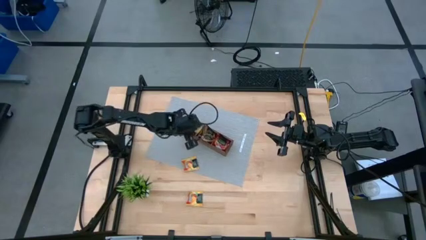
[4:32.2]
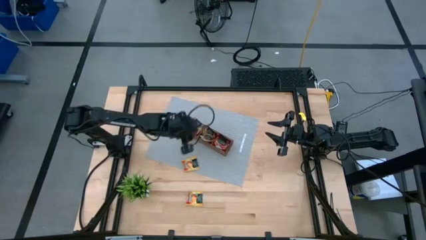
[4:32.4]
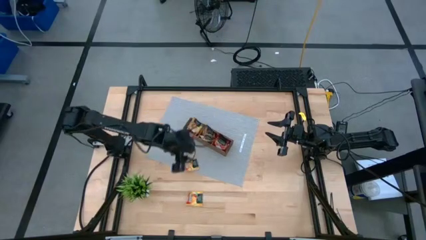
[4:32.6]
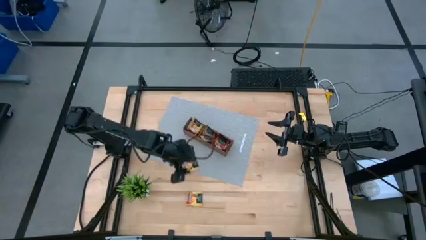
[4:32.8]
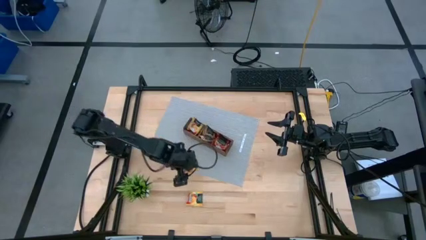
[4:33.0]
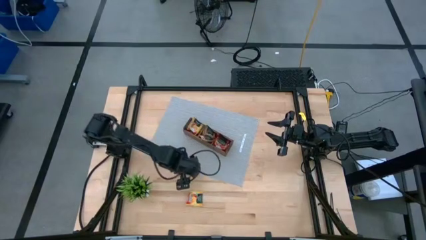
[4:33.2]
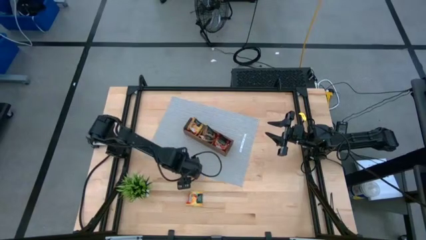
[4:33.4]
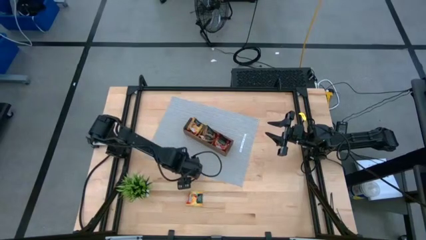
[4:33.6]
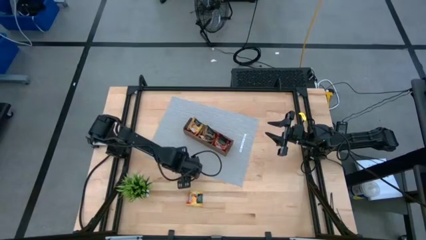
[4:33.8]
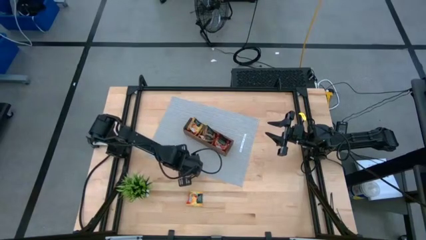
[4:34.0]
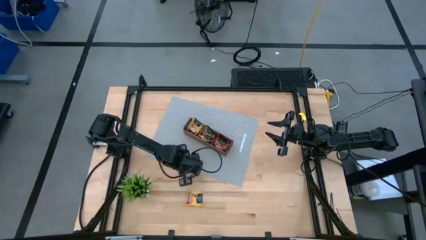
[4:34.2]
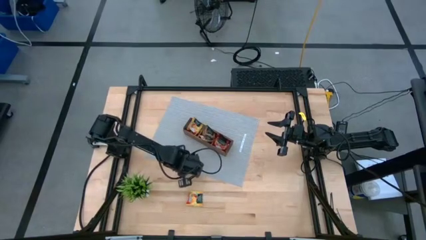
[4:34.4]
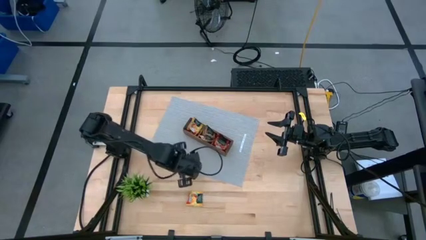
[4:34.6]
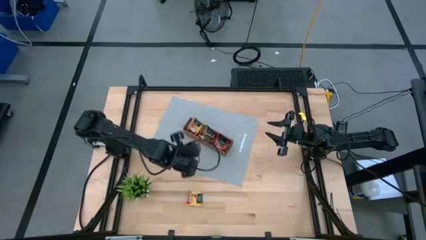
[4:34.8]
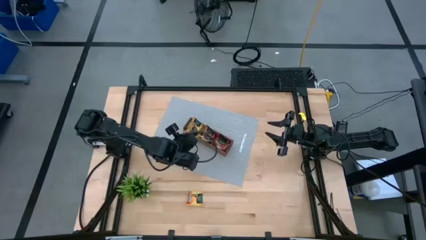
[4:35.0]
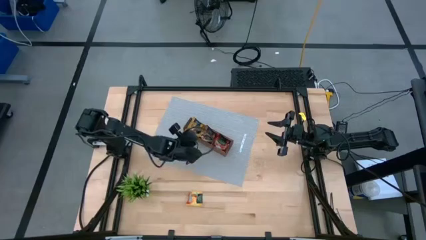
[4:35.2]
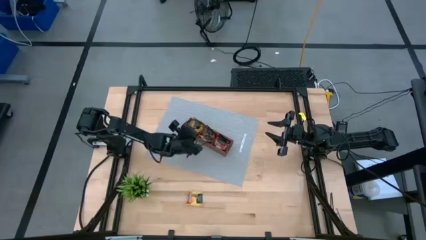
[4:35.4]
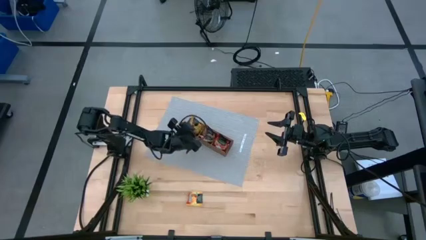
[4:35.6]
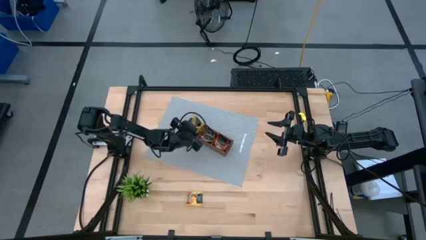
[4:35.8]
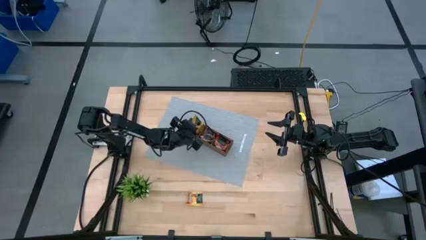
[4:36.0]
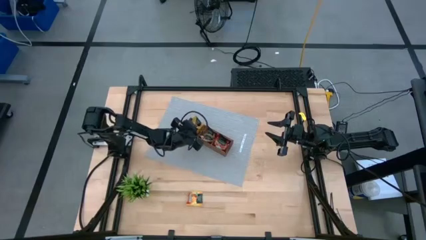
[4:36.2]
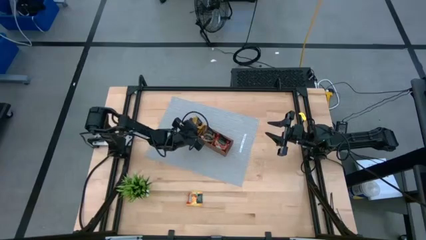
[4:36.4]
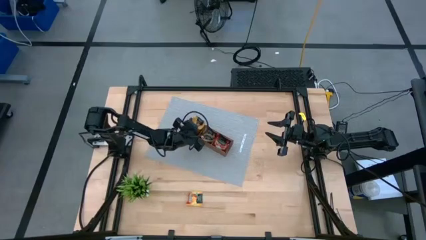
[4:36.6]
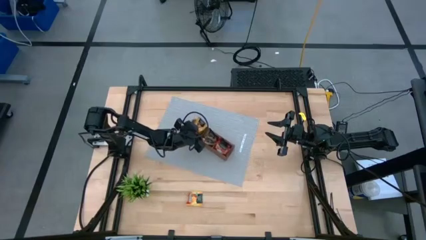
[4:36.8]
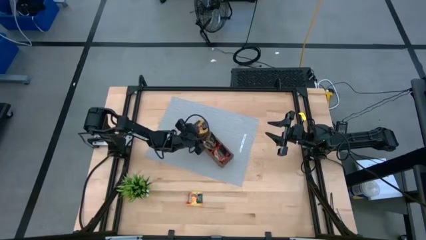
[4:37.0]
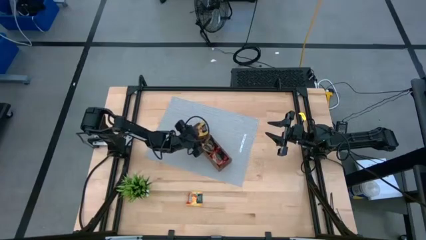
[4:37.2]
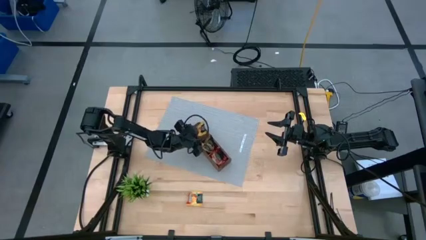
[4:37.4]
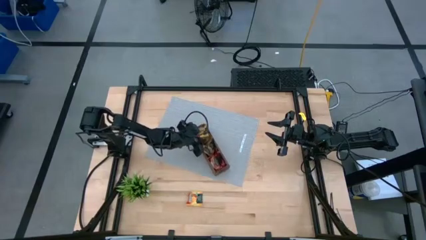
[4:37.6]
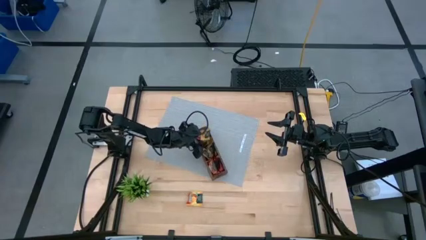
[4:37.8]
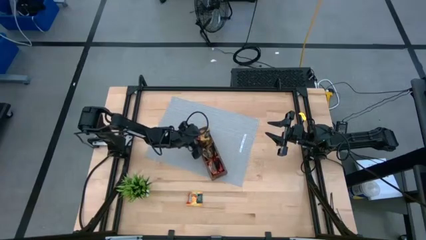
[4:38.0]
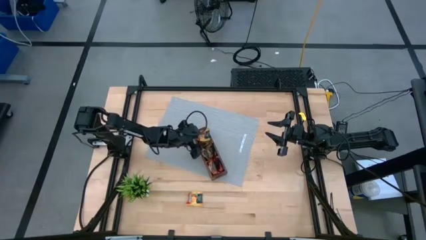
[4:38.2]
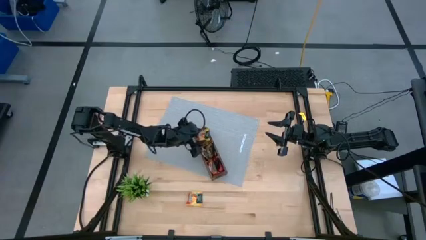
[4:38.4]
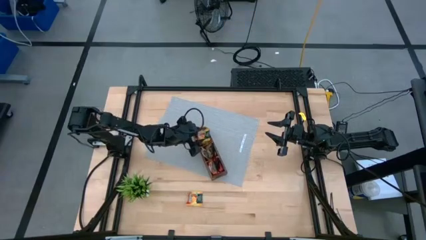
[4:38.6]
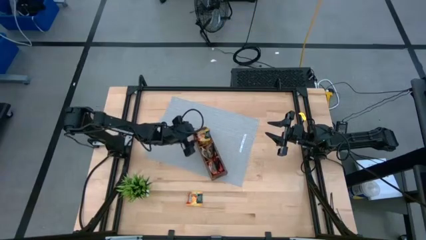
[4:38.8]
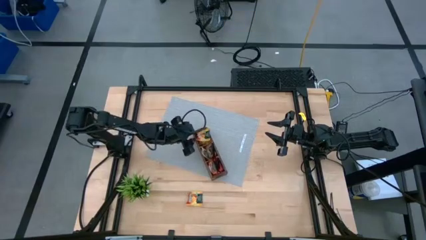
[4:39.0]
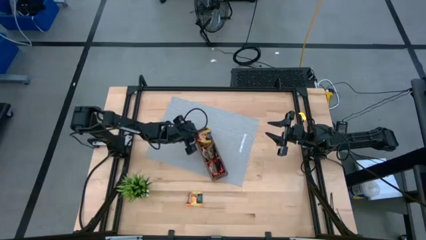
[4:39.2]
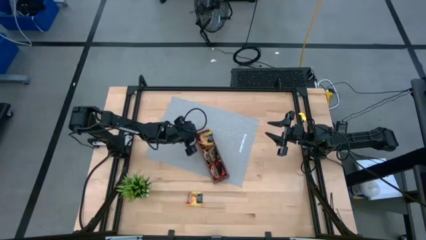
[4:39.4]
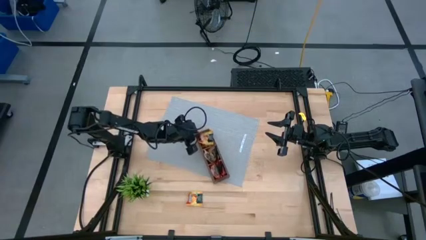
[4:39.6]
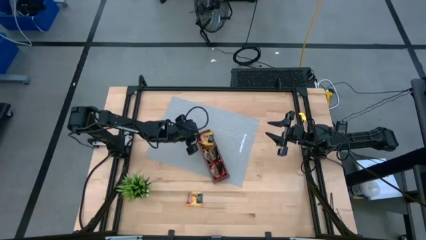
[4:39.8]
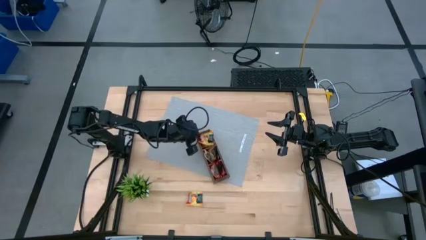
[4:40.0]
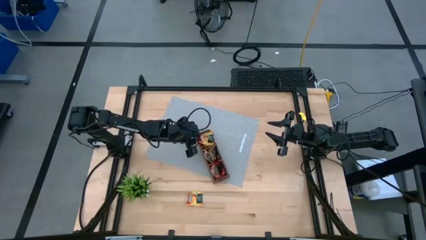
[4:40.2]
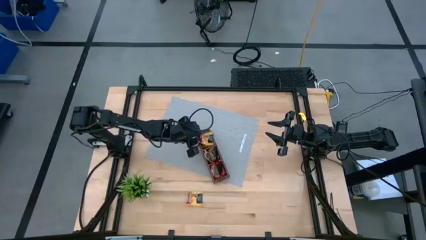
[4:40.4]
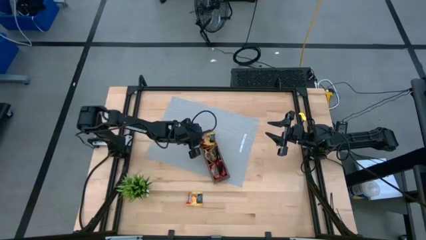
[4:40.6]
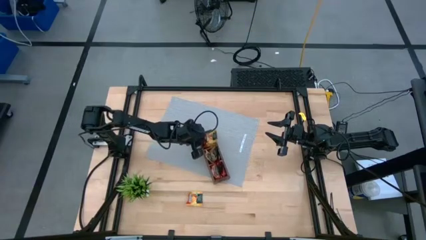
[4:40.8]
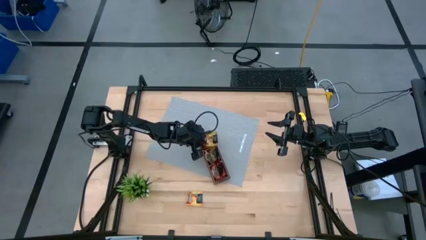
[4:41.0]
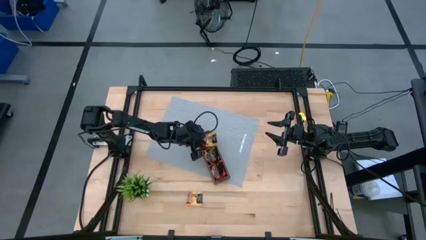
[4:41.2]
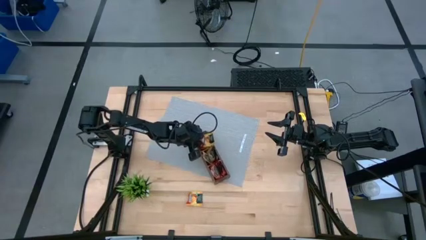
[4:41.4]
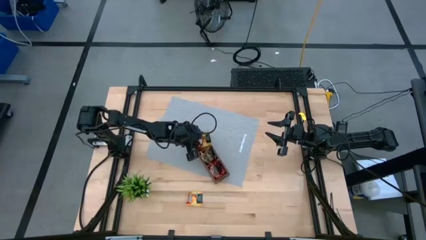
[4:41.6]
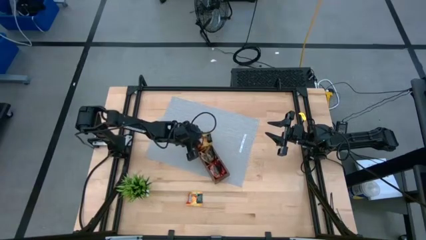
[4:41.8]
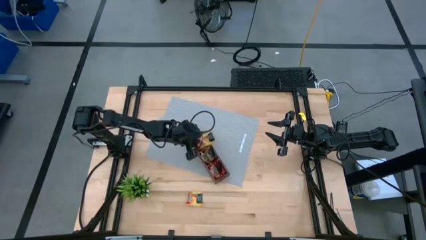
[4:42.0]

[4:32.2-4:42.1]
Task: Pick & Place Tea
Put the yellow tea bag into the wooden organizer

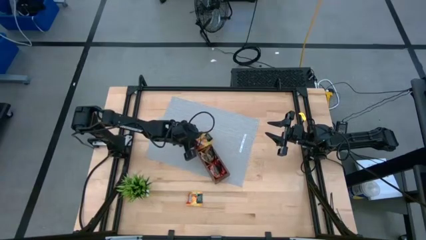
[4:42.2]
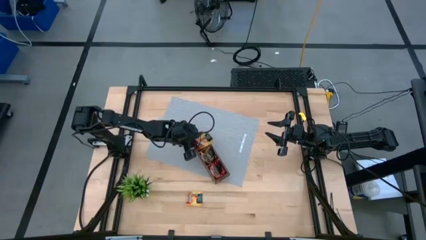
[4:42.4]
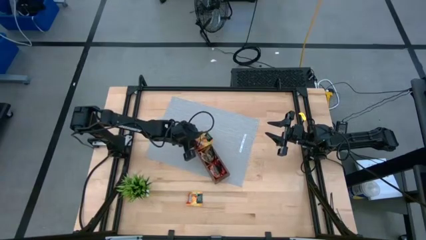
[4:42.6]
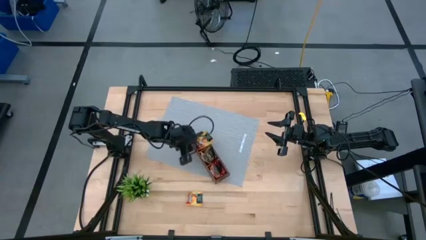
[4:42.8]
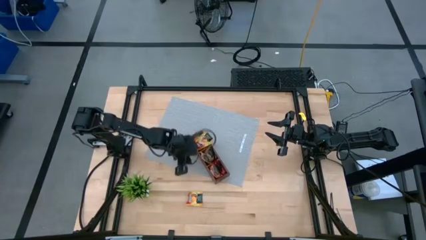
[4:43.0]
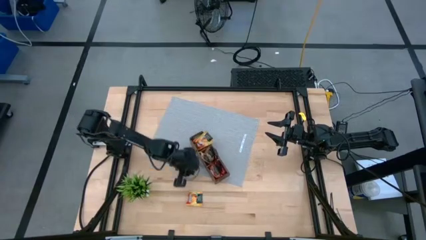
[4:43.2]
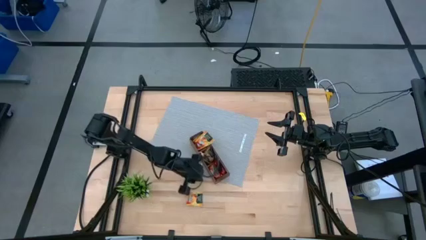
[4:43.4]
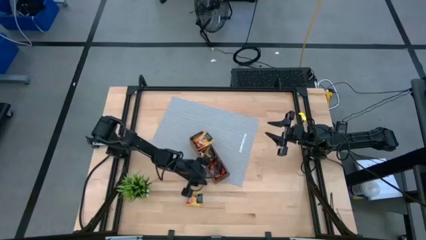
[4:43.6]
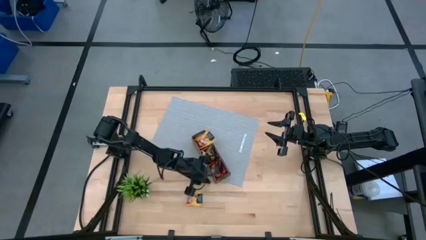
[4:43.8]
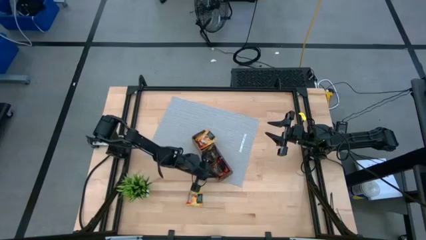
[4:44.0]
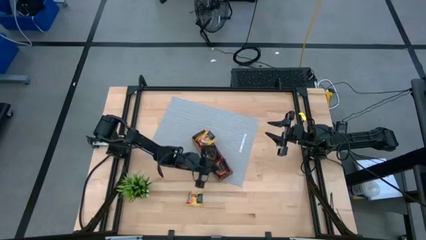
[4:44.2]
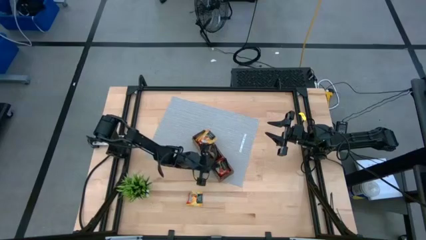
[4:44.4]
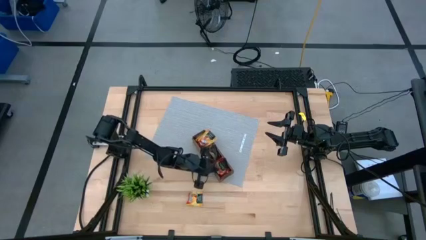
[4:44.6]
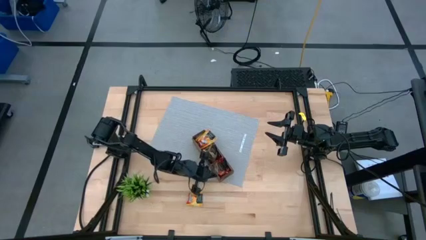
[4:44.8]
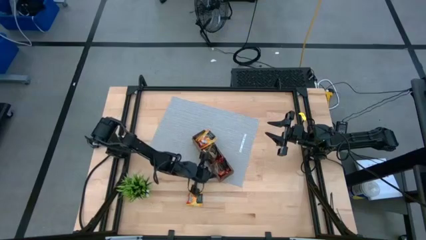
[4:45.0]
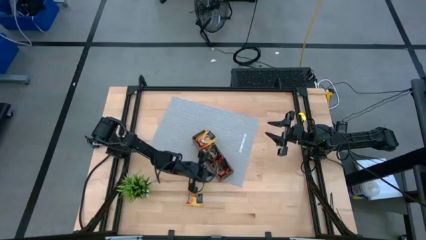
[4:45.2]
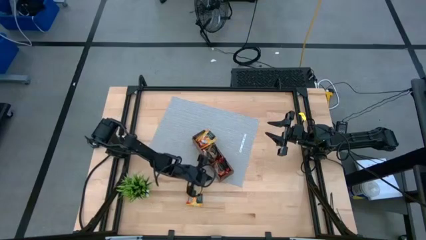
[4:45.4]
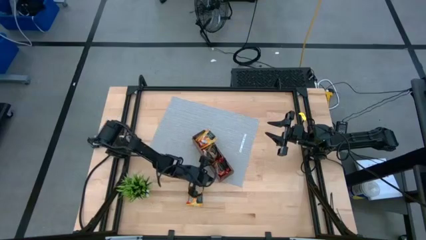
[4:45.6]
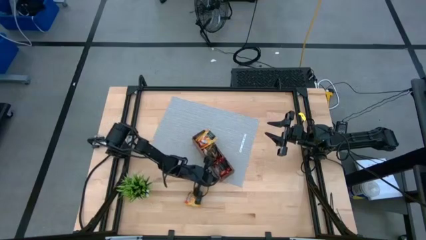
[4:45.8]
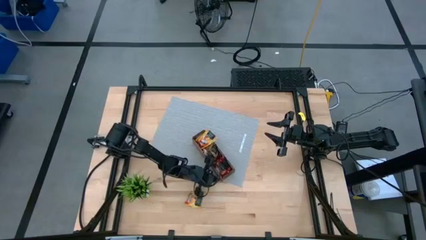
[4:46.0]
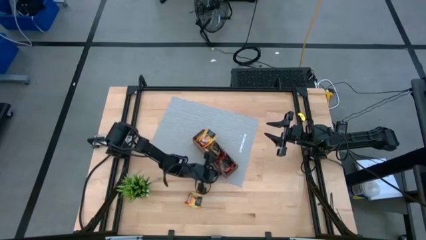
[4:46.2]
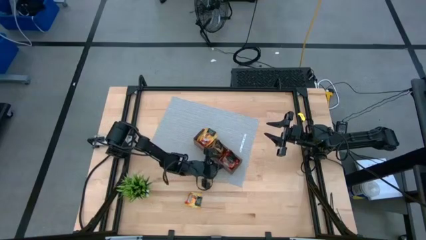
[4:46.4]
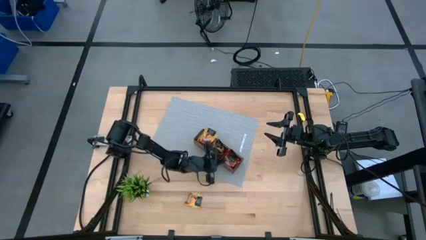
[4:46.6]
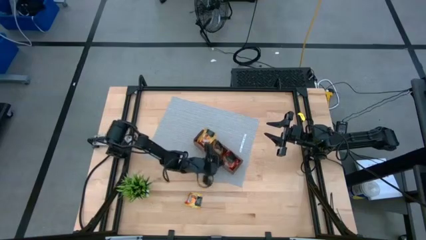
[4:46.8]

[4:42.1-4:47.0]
Adjust the wooden organizer

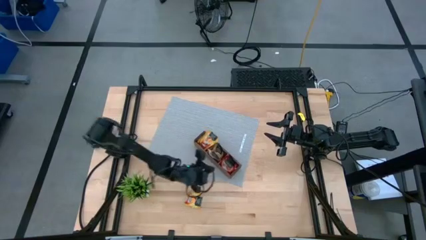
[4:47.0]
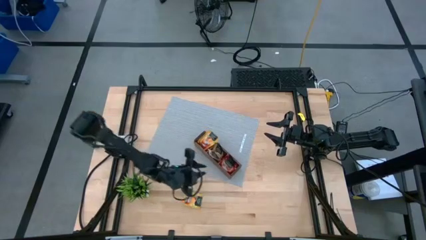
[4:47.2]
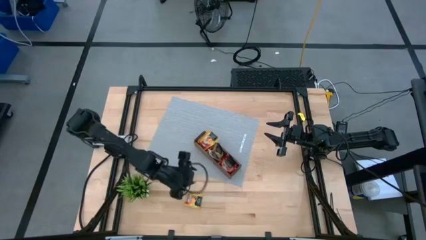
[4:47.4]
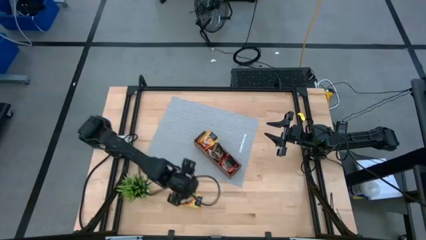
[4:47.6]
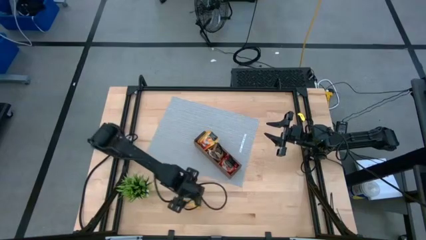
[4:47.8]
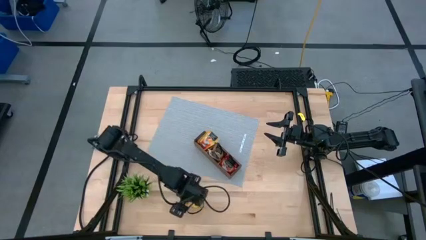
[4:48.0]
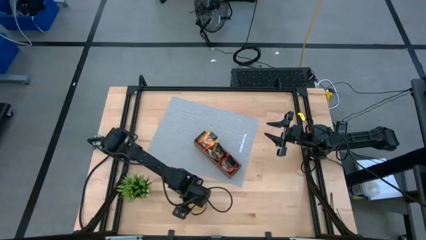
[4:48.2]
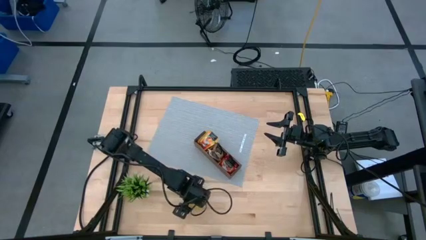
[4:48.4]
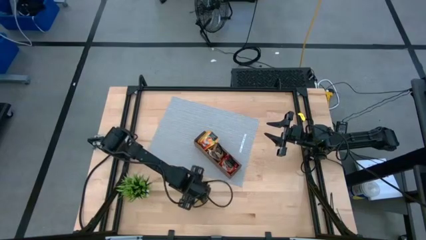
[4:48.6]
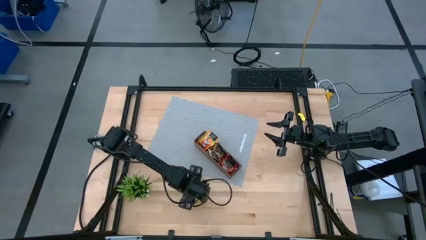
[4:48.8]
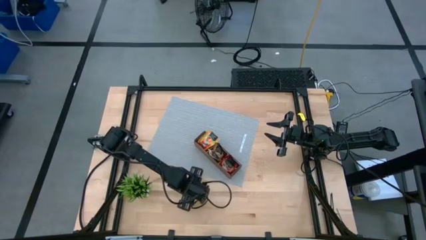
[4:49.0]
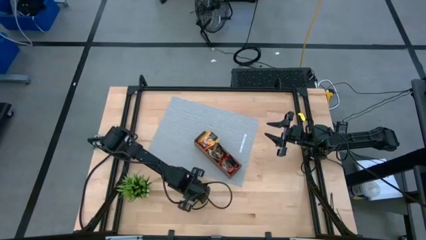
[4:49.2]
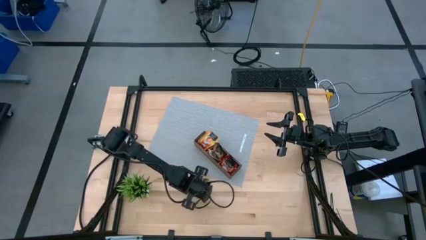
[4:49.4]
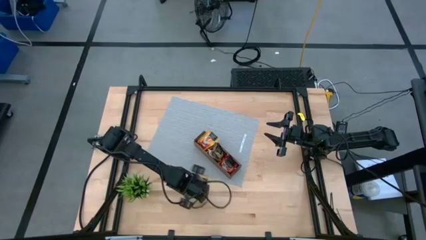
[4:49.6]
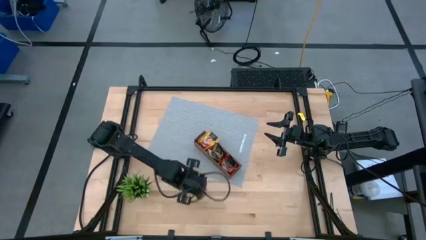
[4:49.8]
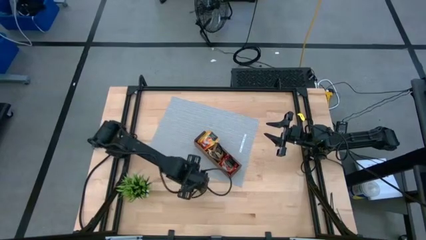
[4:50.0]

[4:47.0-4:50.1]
Put the yellow tea bag into the wooden organizer
